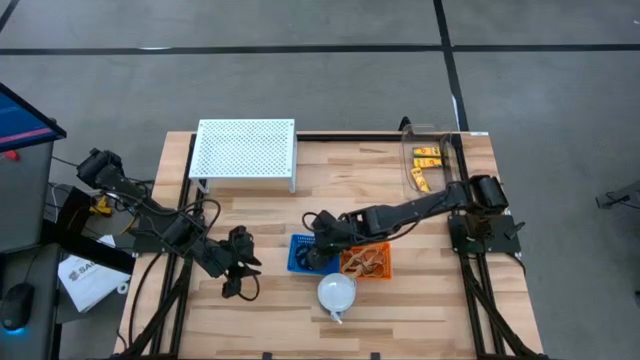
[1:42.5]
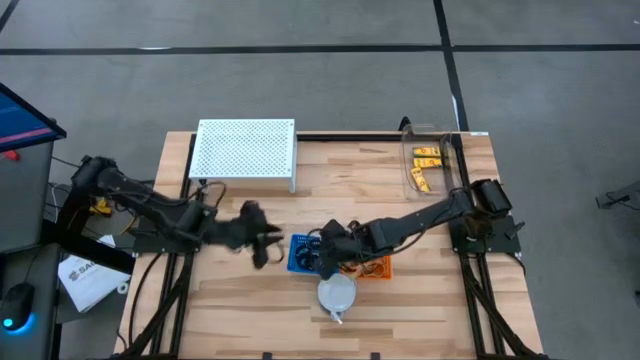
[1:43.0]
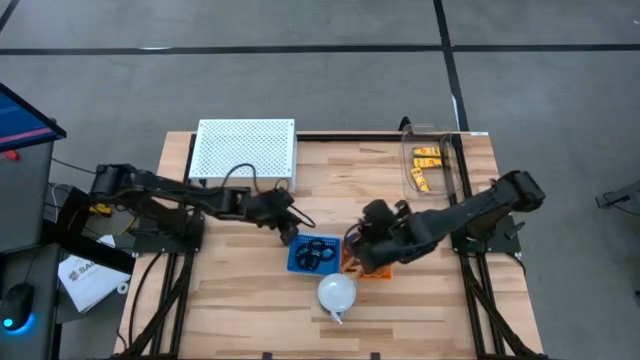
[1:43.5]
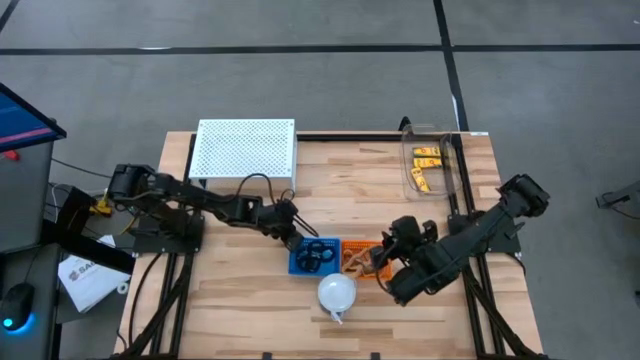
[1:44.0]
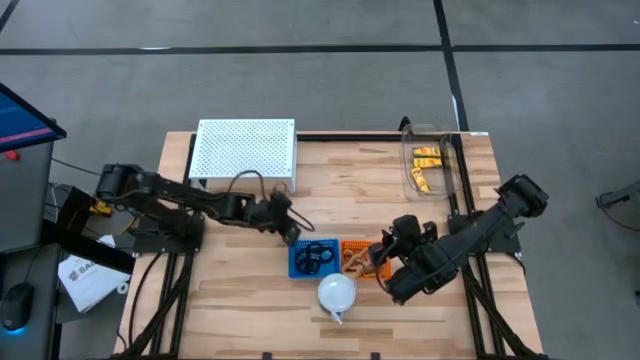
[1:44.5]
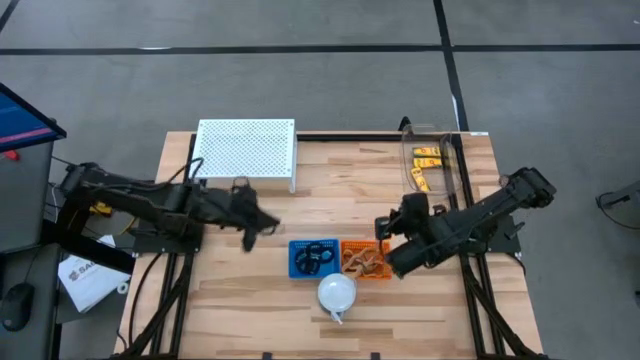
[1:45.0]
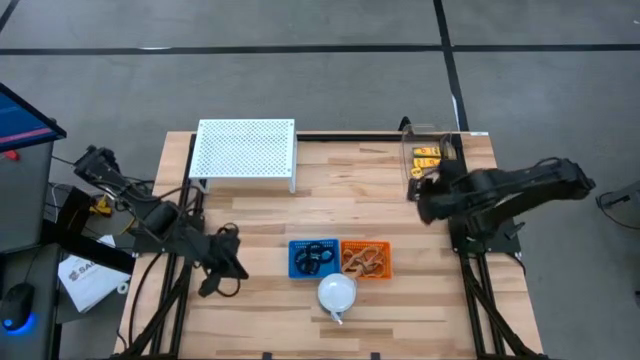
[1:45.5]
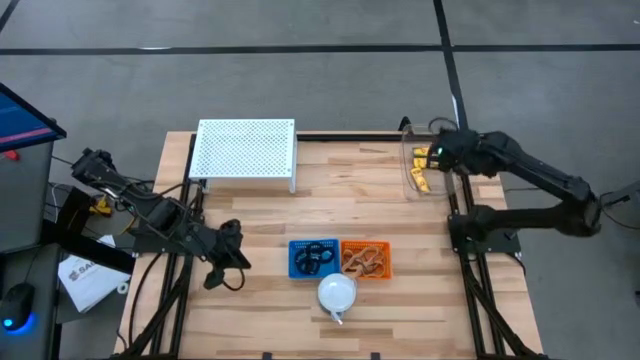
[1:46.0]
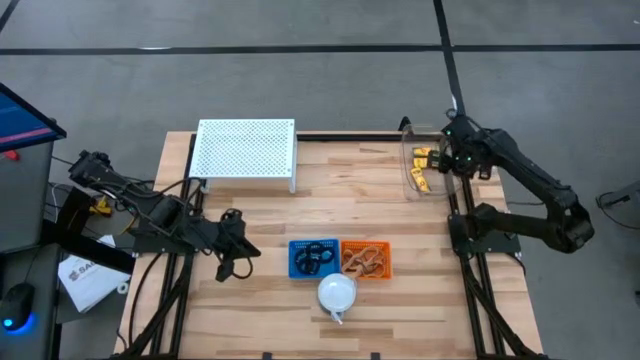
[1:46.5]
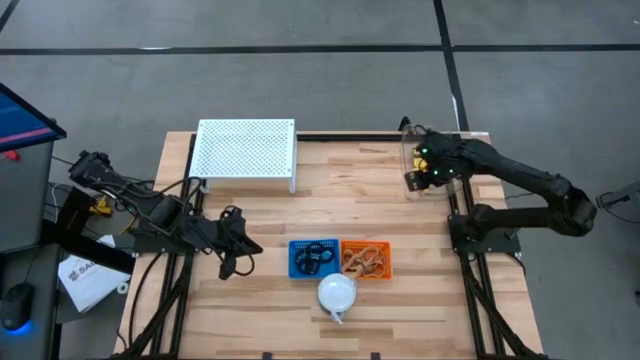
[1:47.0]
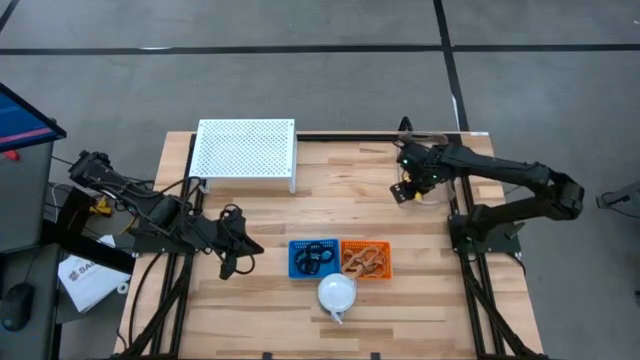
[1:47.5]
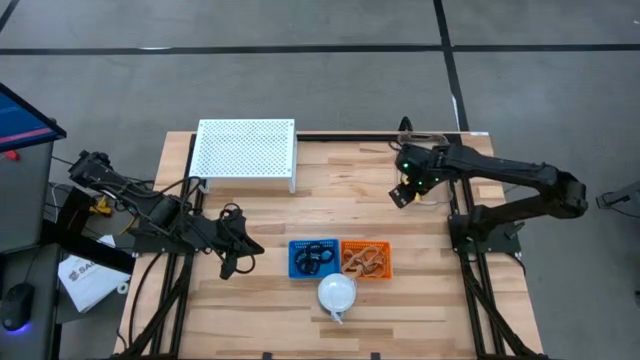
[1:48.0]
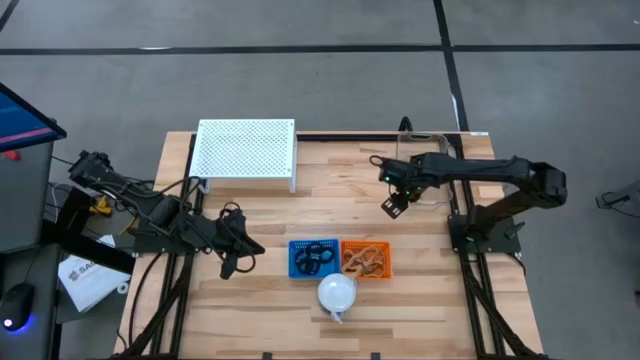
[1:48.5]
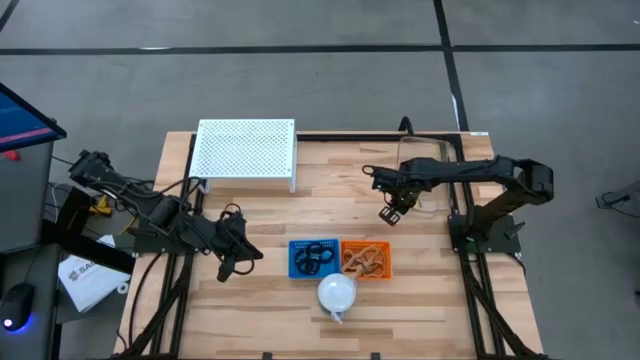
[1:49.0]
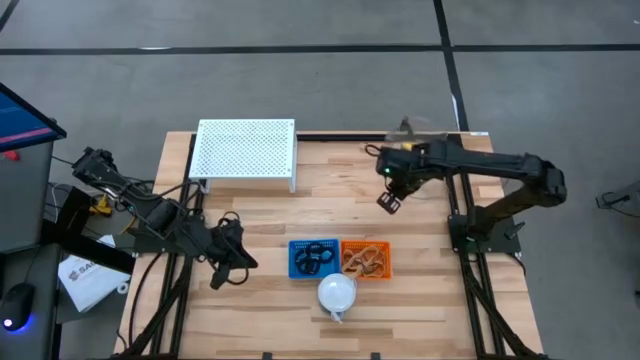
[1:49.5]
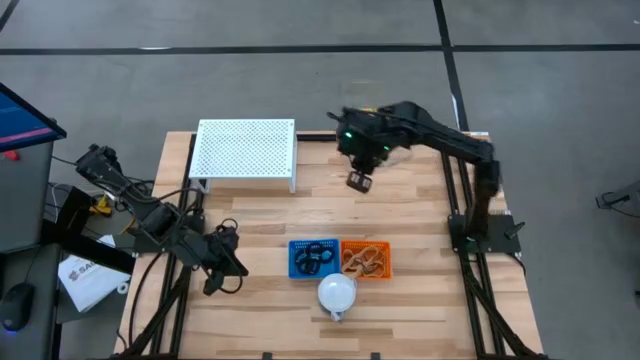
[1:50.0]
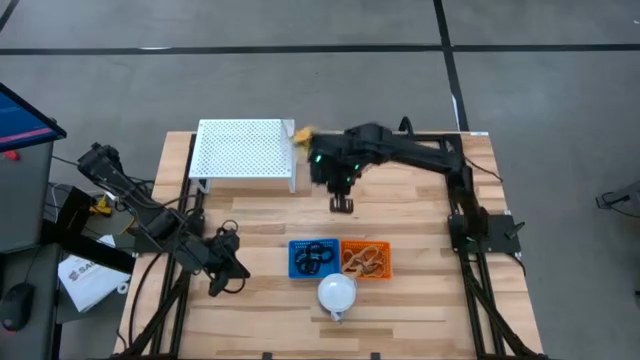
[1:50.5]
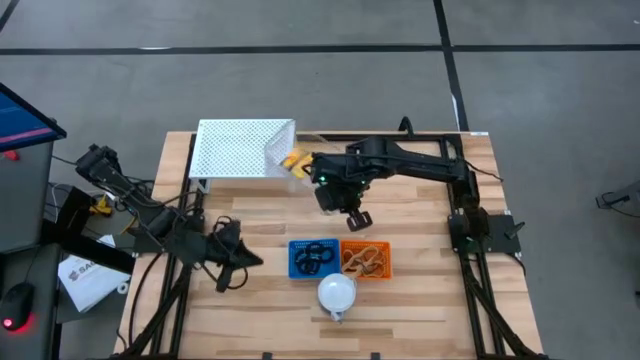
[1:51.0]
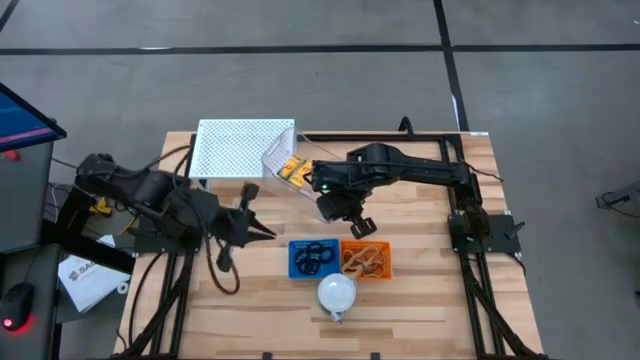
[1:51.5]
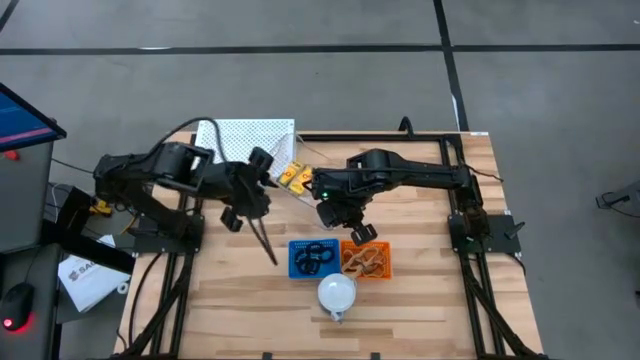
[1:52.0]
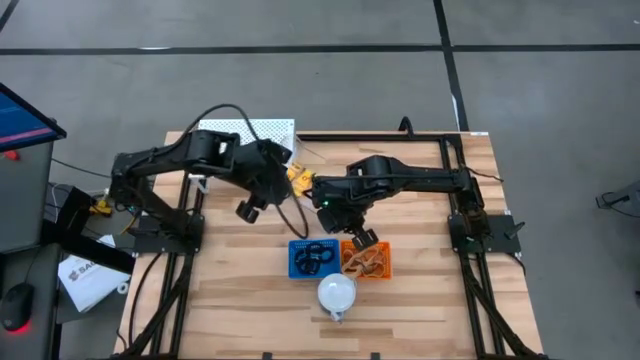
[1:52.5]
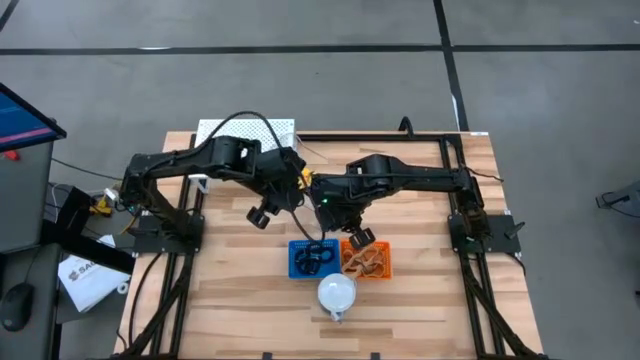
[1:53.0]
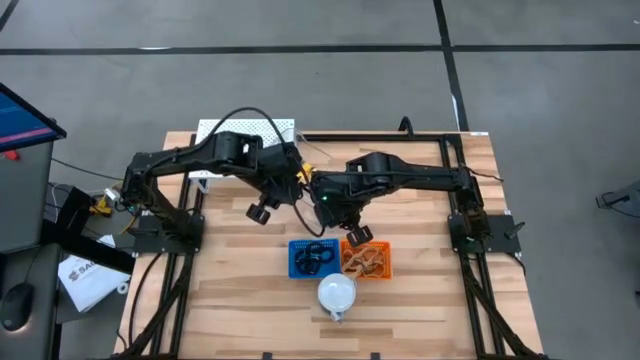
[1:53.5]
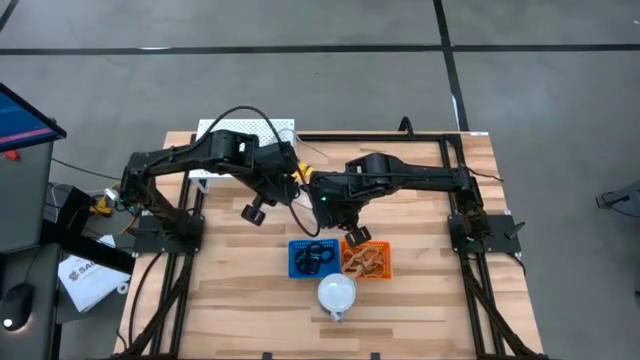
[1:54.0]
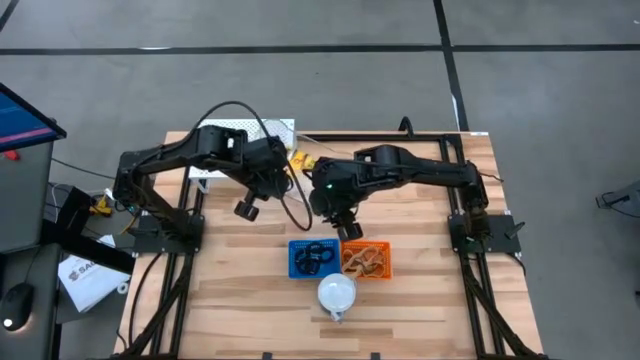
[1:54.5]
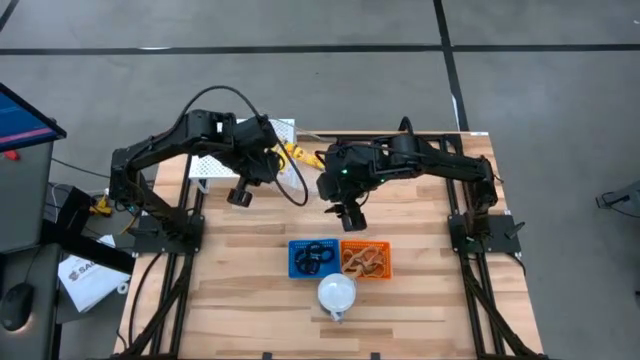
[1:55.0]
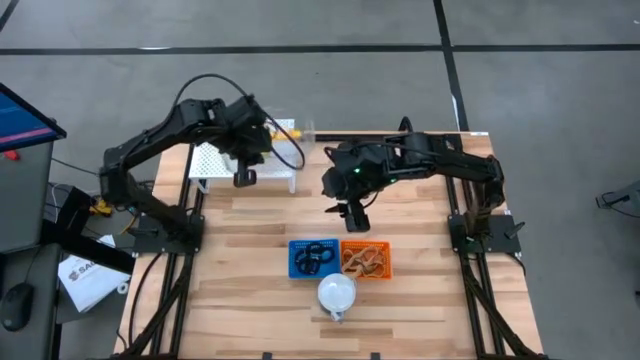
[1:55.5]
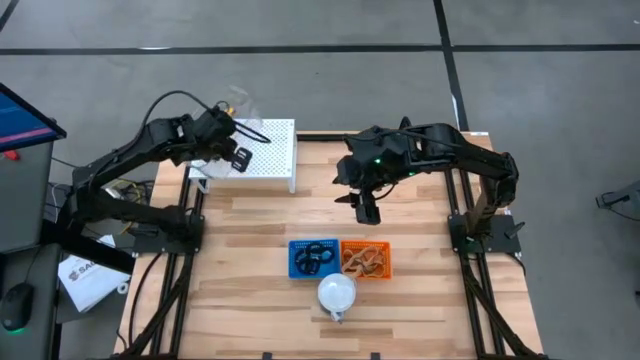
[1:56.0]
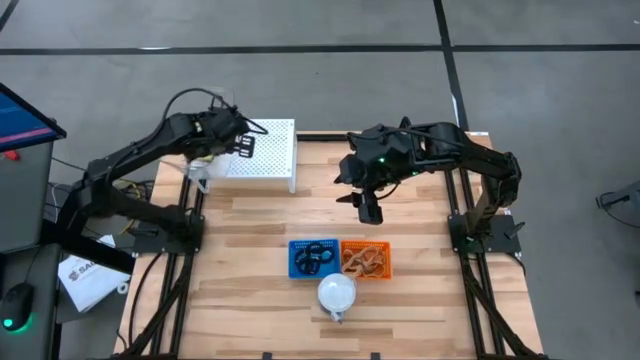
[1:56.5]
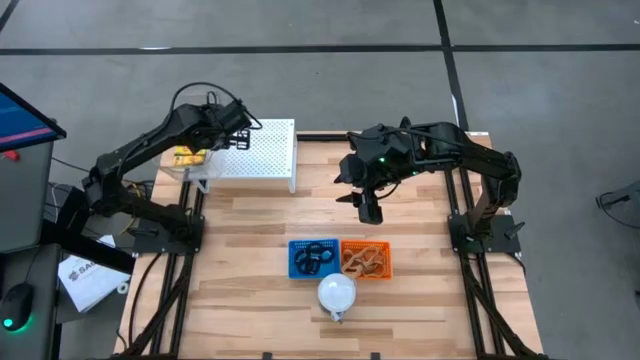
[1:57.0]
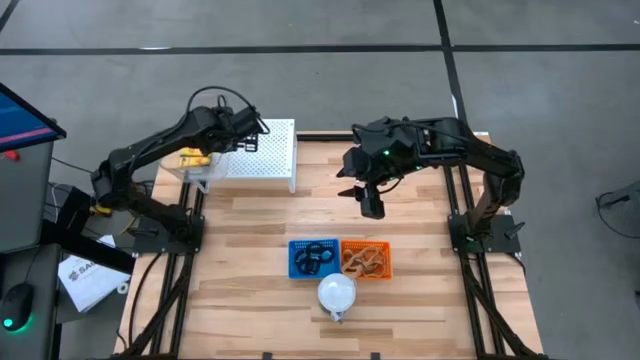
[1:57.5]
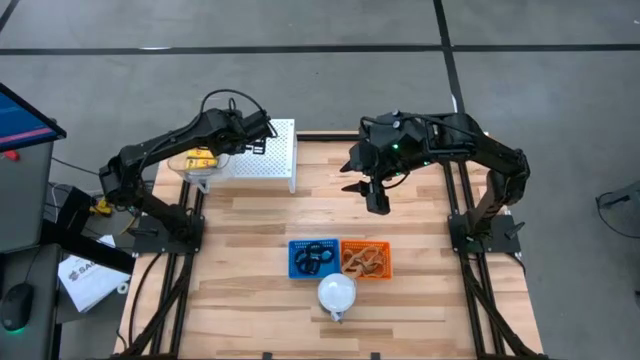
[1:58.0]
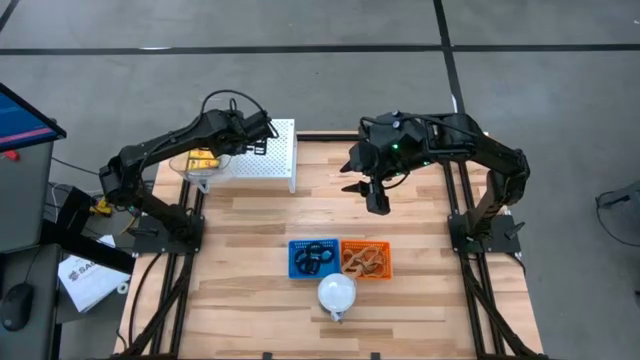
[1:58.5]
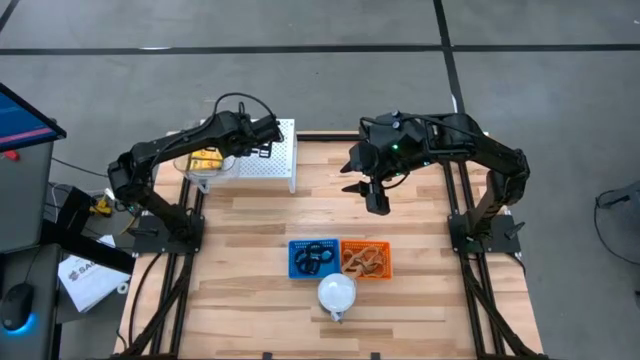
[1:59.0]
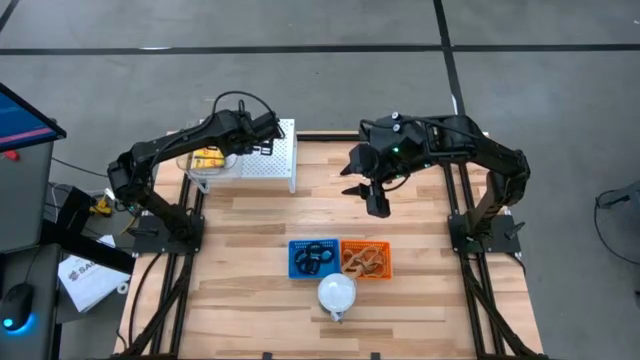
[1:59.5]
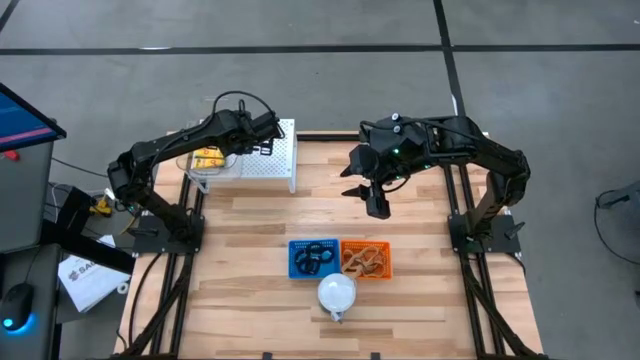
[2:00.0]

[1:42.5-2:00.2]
Task: Pick & Place Office Desk Supplies
Put the transparent bin filled with crayon boxes on the shelf

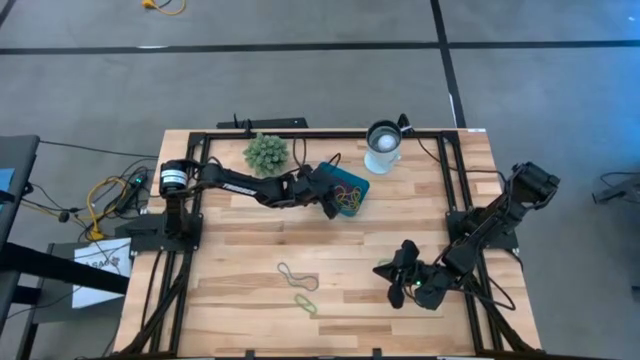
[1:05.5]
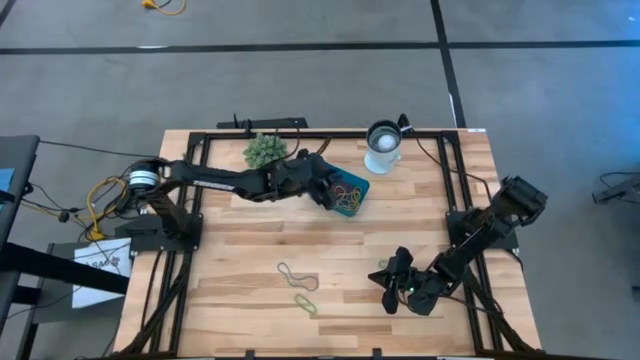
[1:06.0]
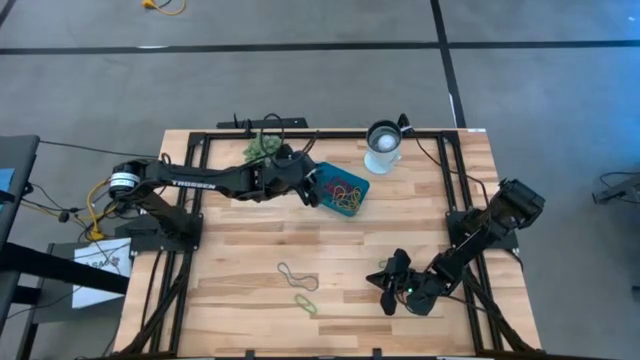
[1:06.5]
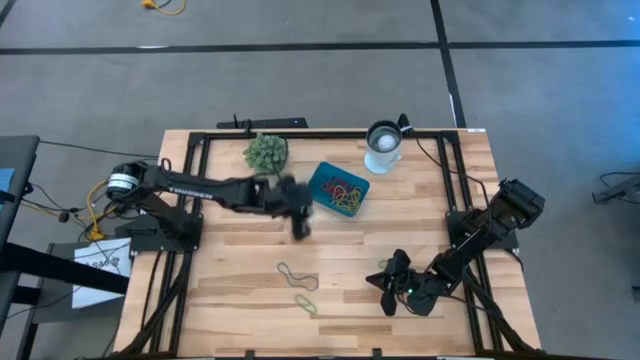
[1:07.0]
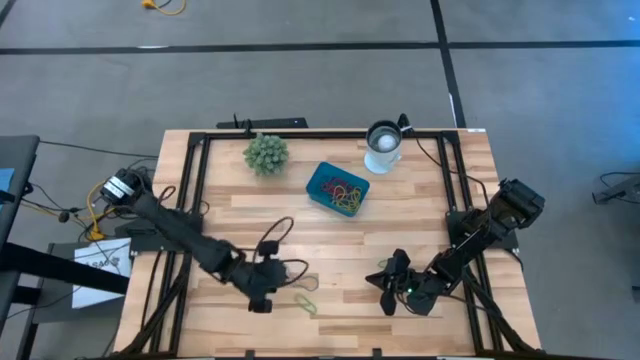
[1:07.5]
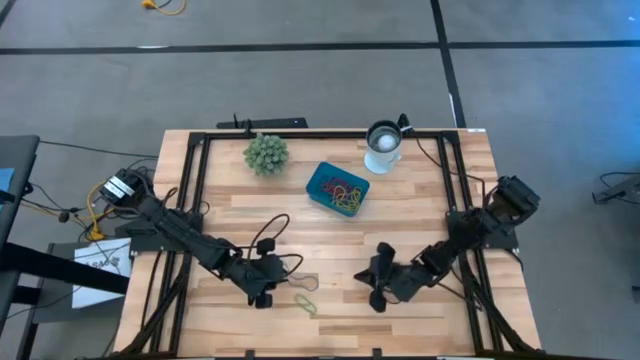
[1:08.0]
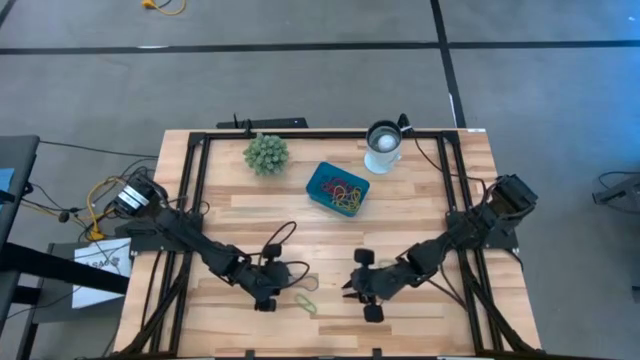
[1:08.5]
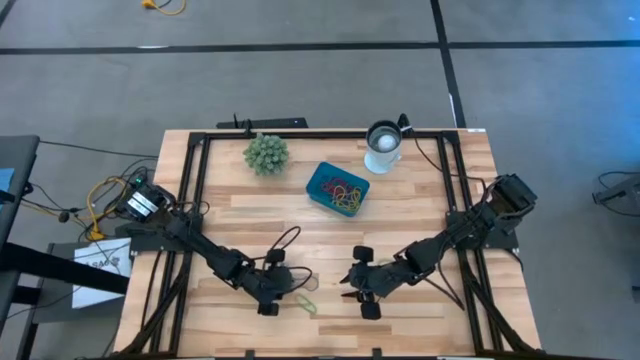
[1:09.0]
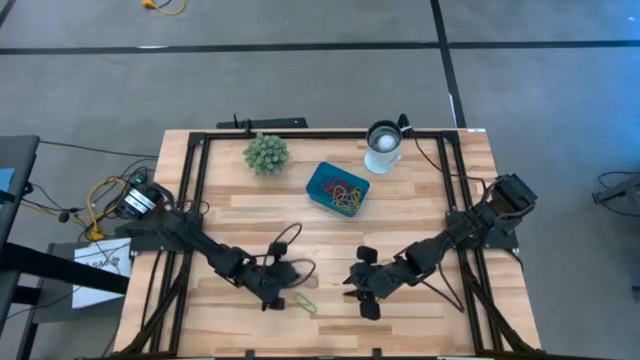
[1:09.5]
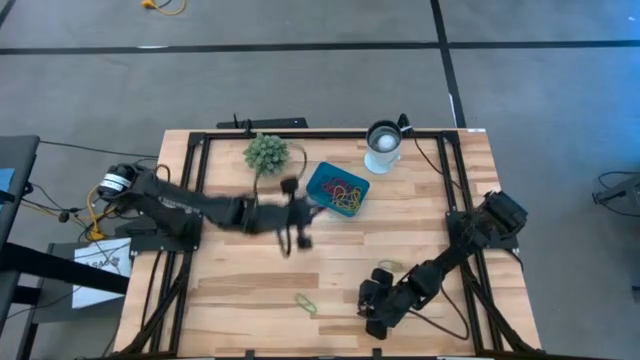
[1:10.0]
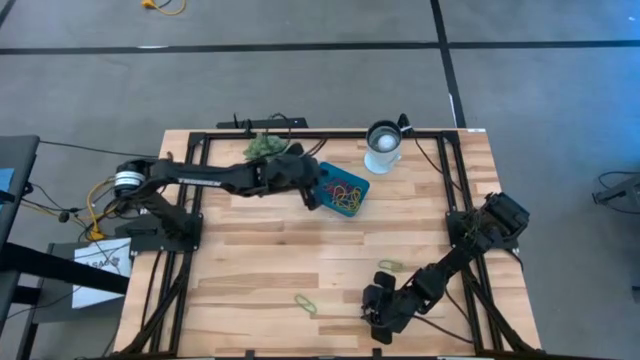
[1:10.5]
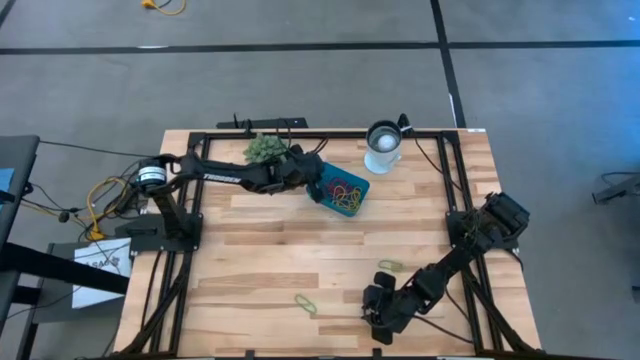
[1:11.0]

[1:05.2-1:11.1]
Task: Pick and place items into bin
Put the blue rubber band into the blue bin
